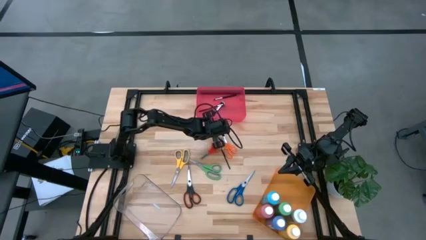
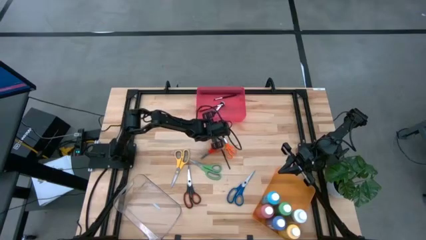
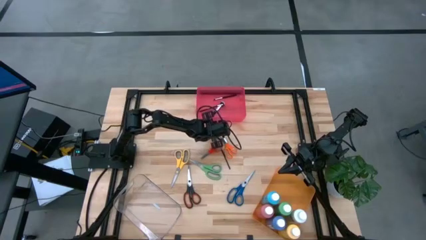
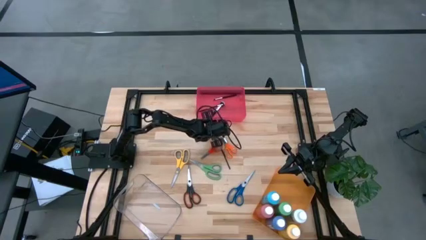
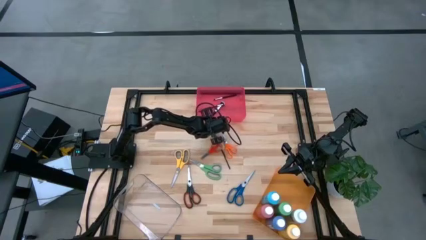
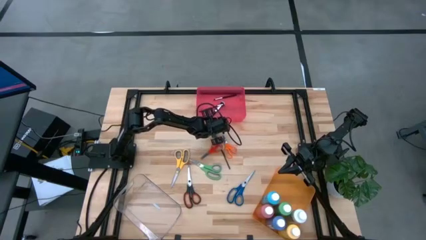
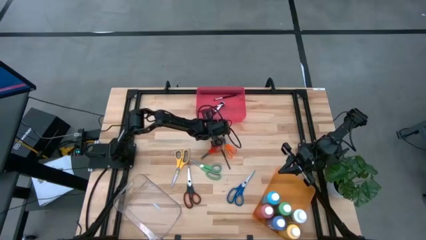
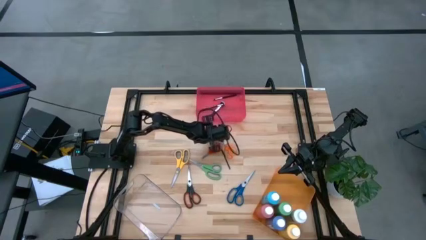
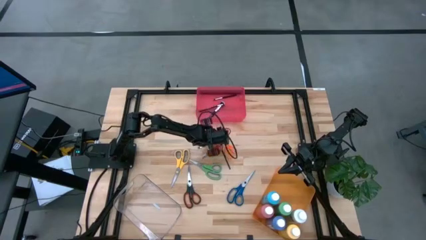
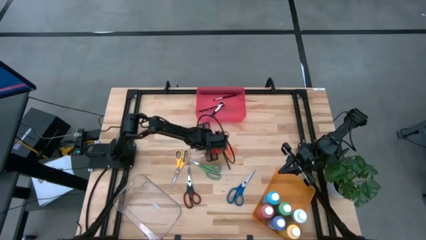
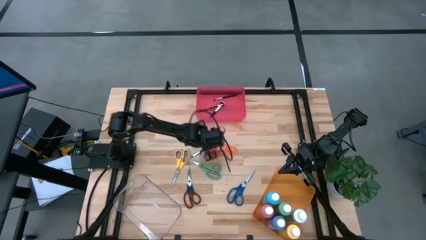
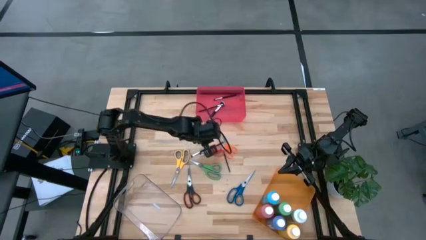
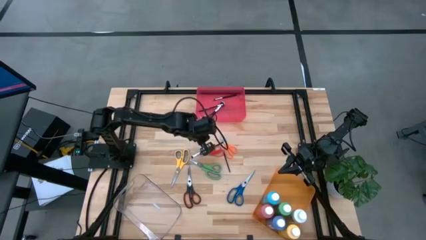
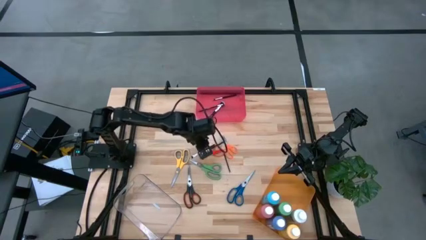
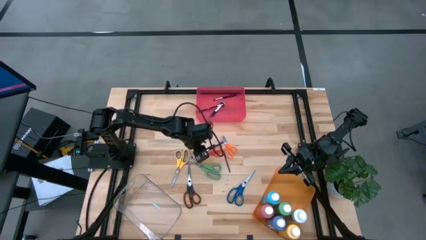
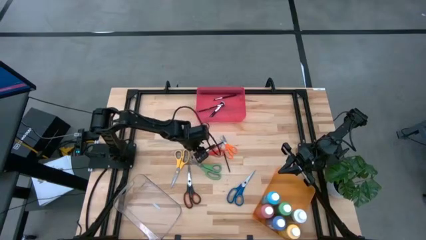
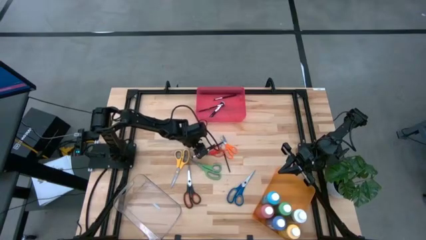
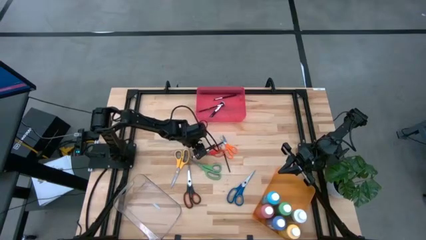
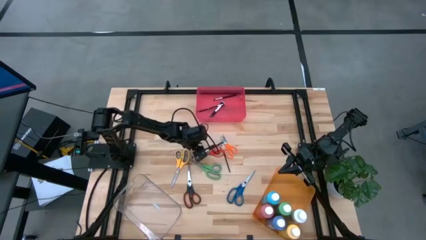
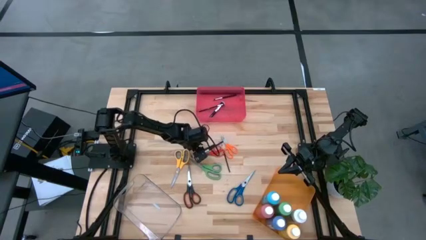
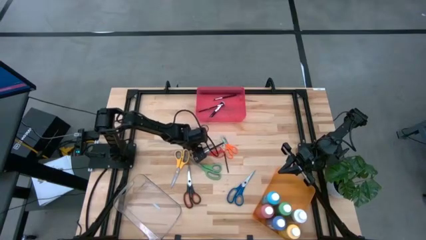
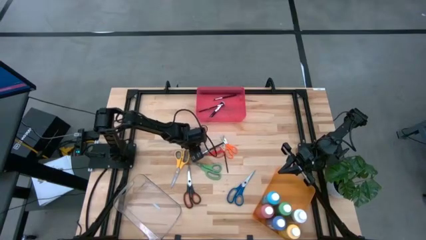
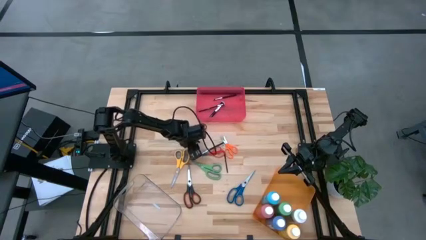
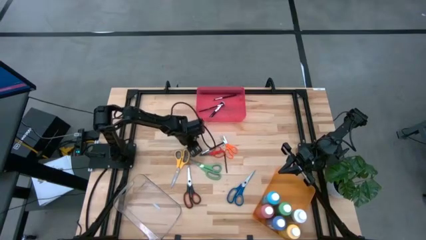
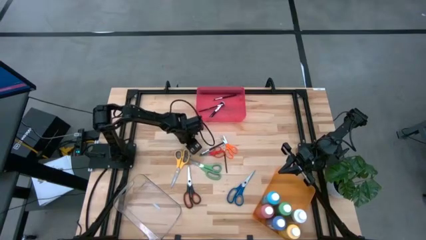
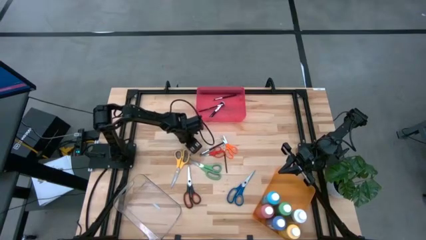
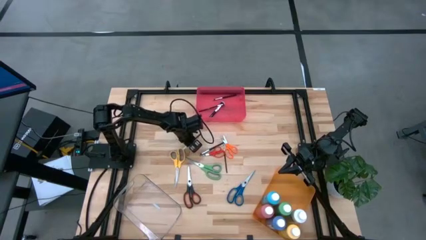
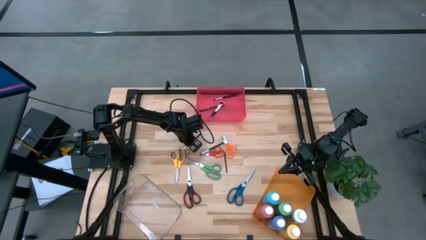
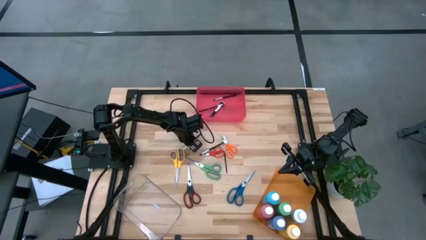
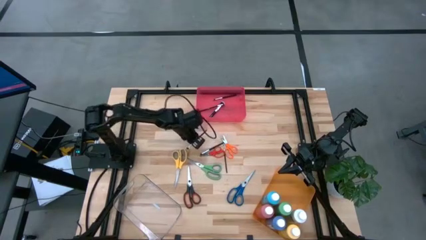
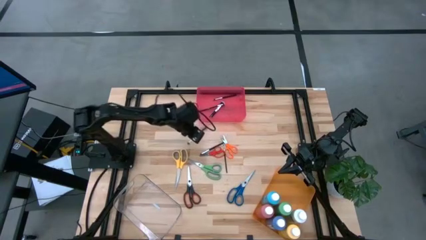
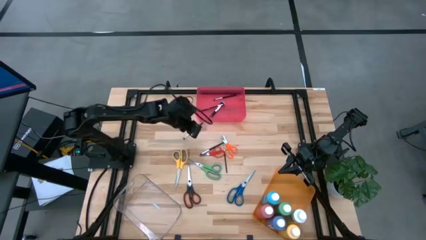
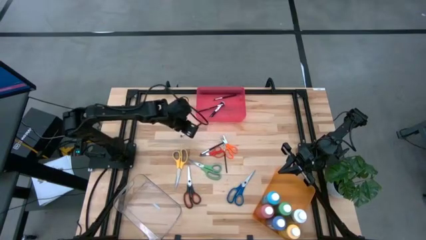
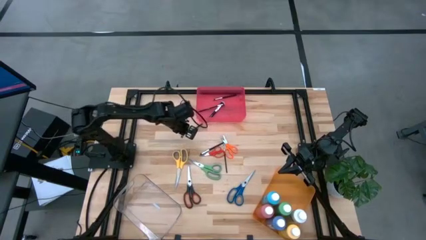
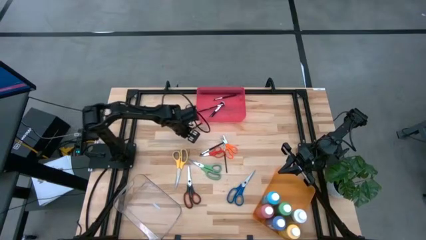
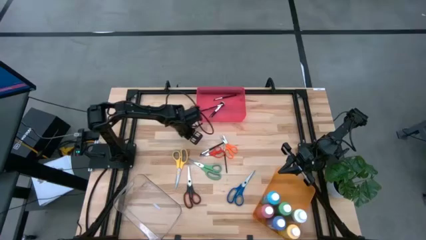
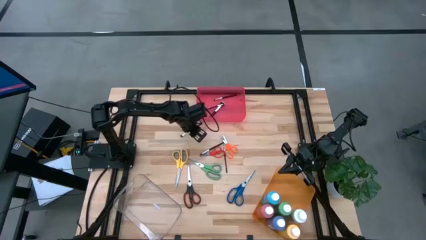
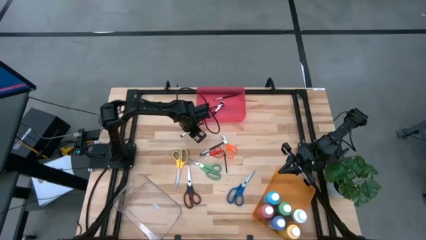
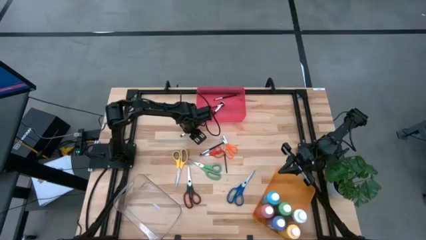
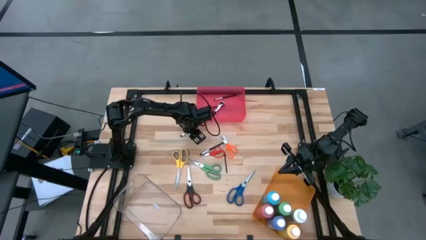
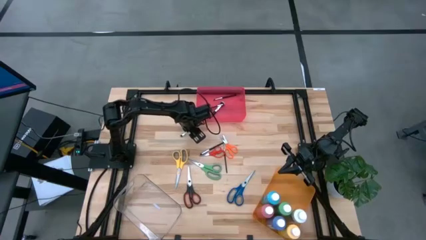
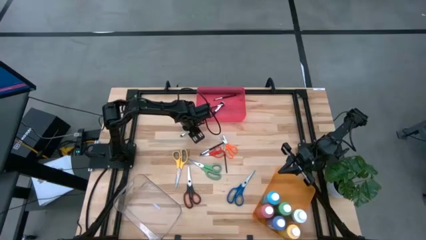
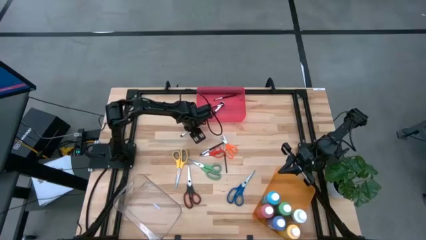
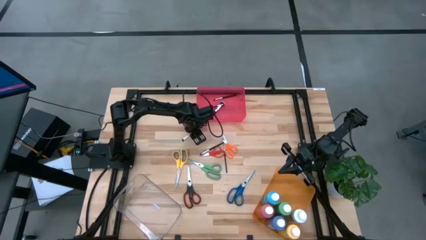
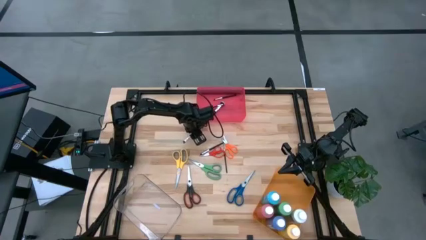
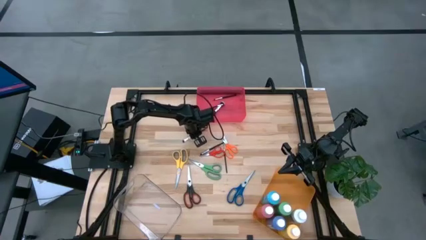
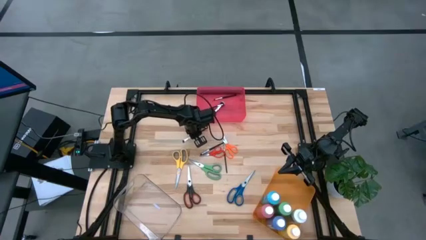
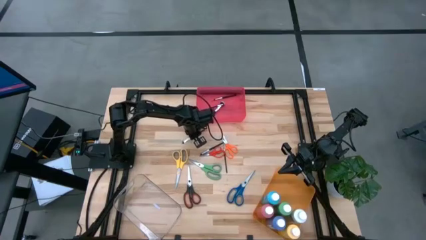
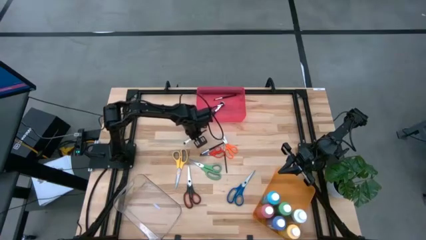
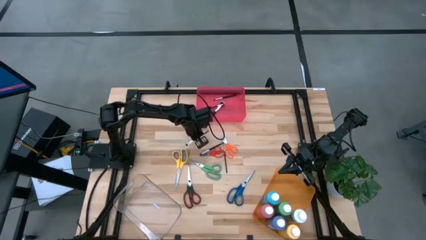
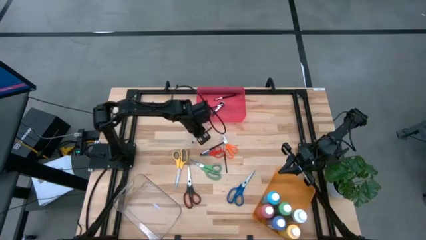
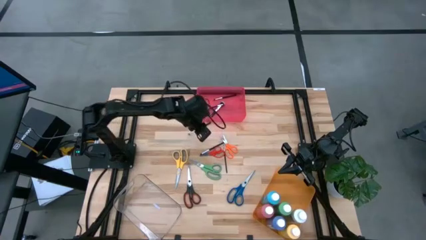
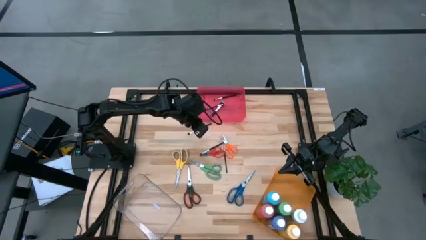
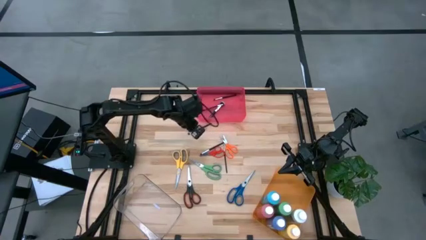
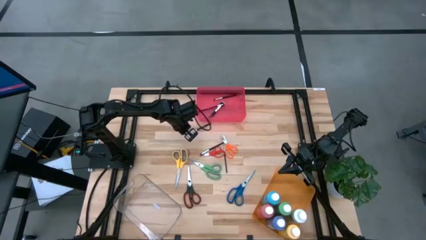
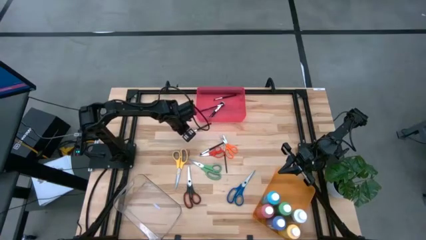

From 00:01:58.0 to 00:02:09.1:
Task: Pick & Place Paint Supplies
Put the silver brush into the red bin

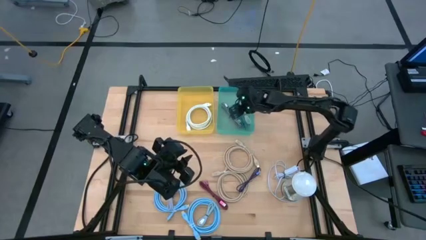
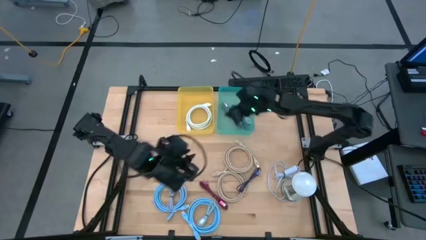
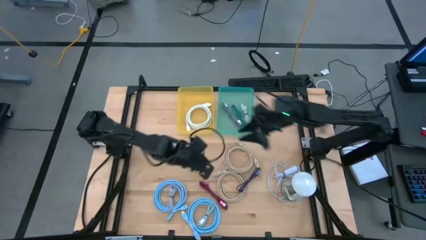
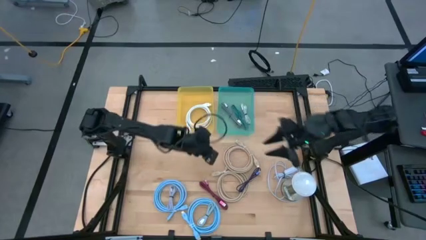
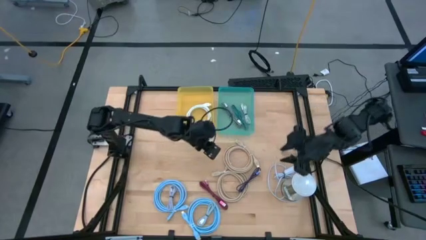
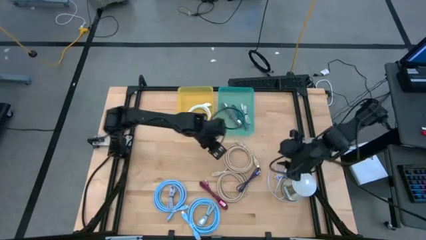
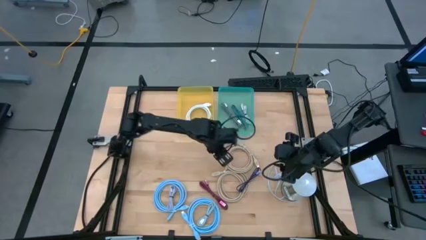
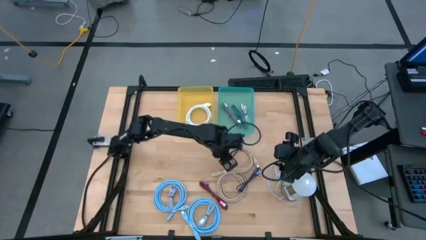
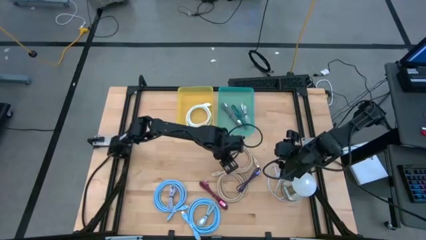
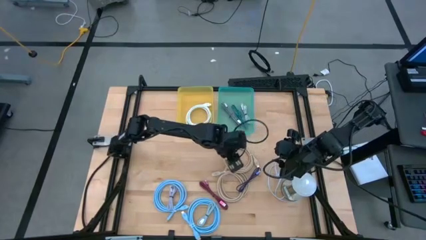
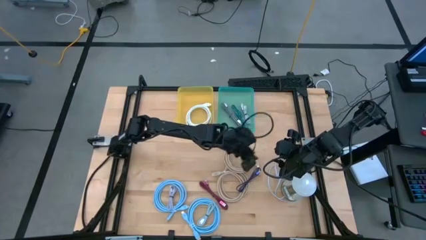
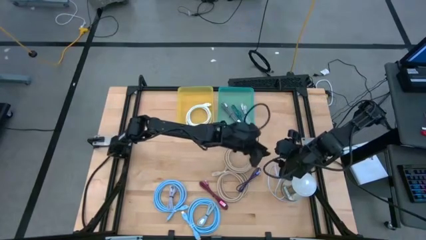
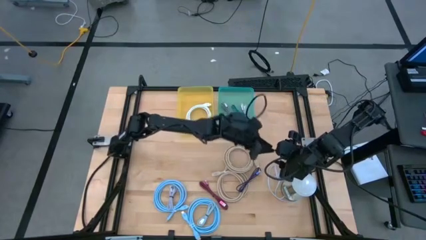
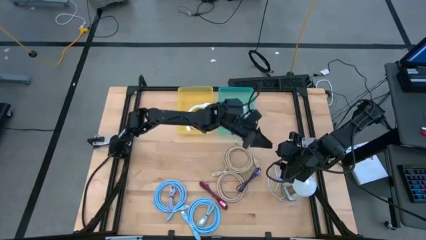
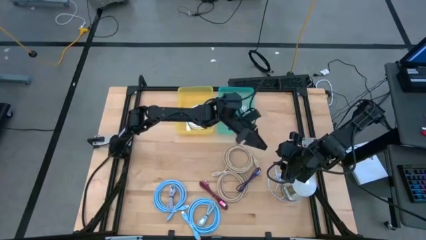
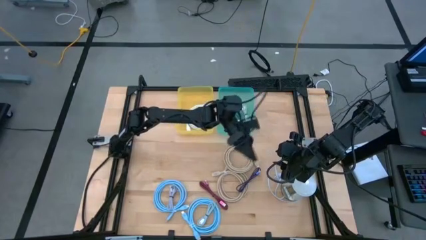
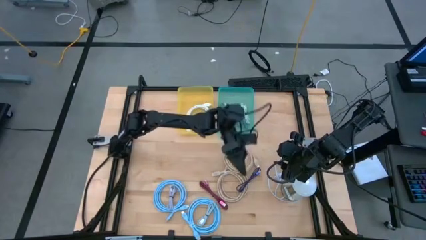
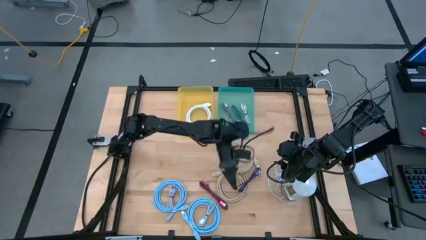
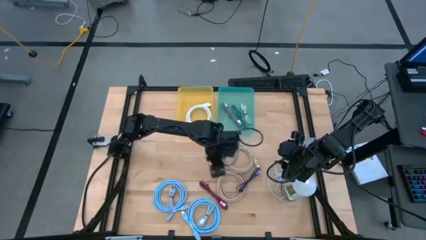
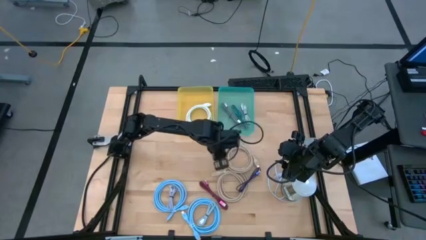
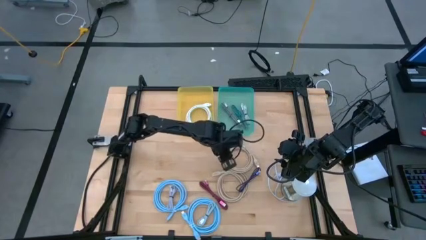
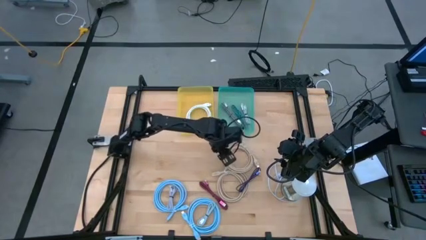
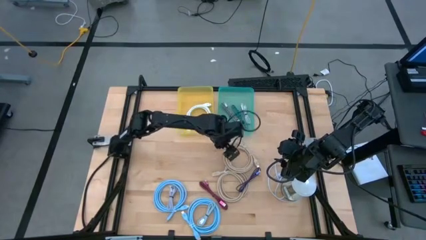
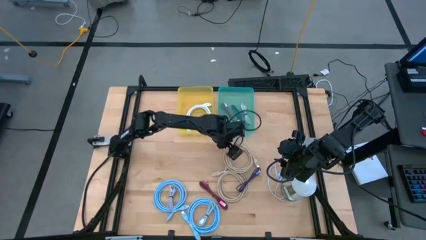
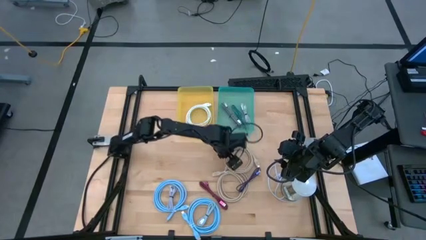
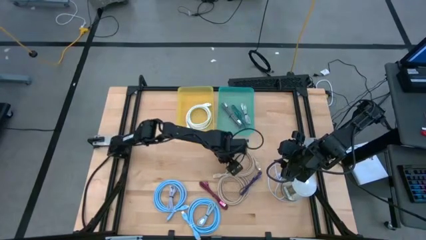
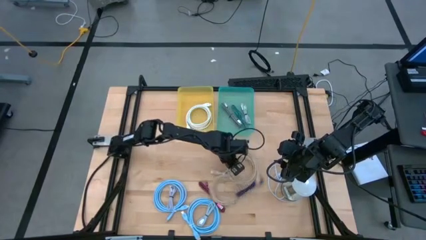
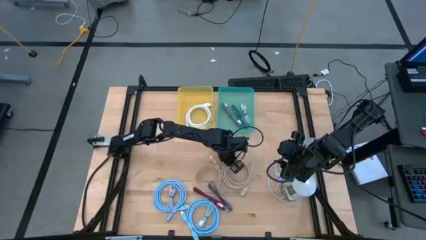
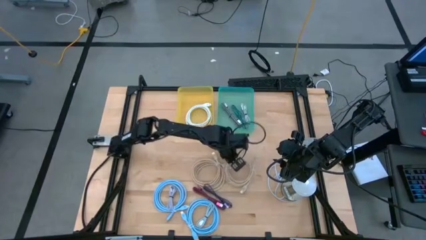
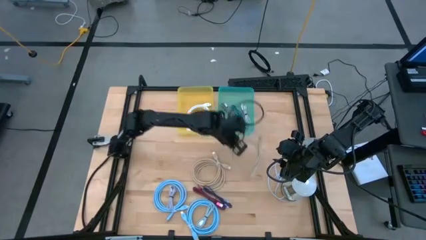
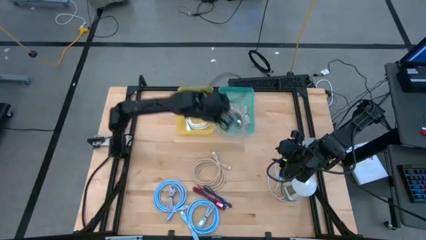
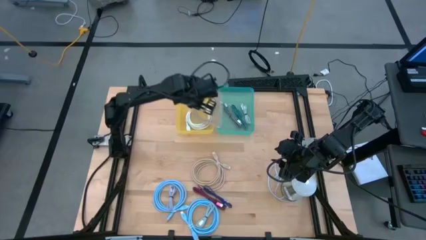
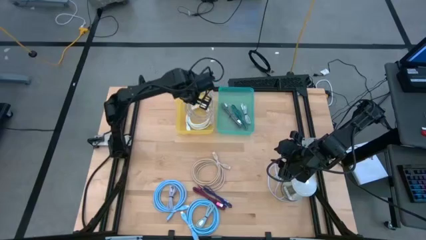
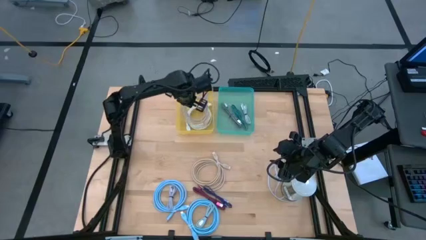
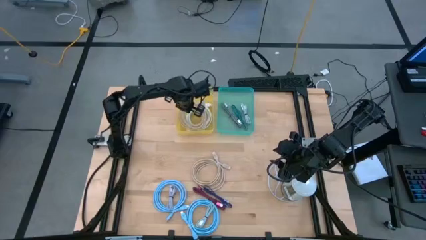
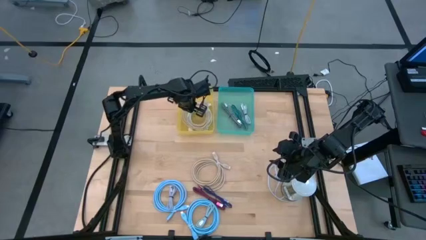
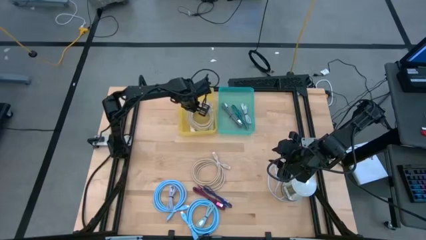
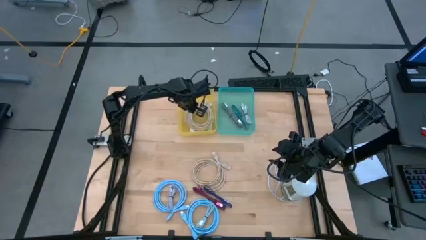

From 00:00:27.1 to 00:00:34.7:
Task: Pick and place USB-C Cables
Put the top large light brown charger cable into the yellow bin
